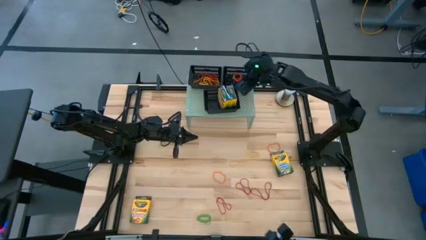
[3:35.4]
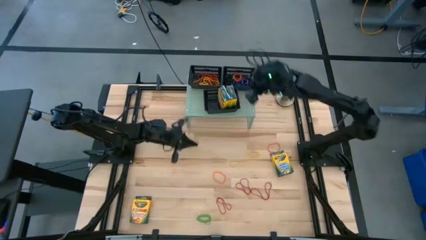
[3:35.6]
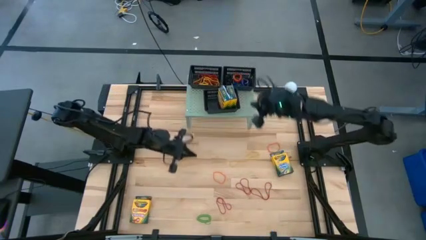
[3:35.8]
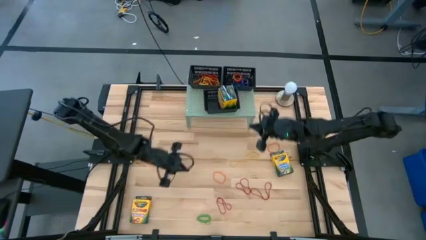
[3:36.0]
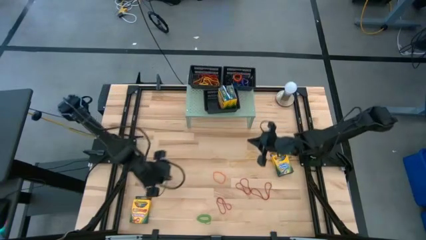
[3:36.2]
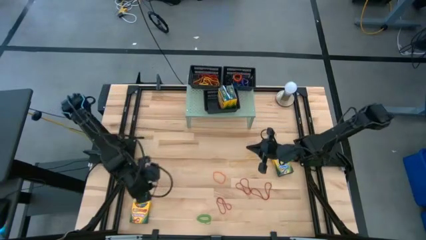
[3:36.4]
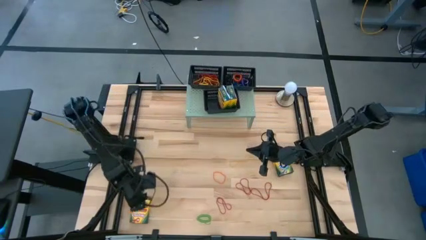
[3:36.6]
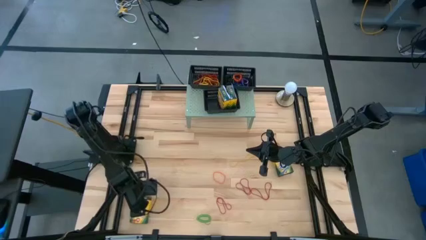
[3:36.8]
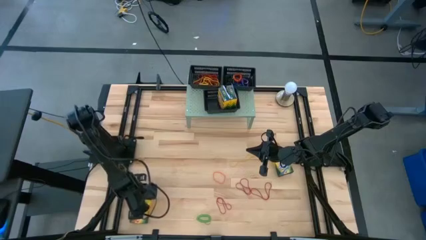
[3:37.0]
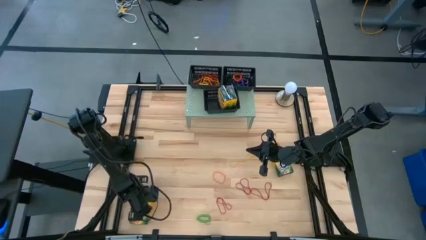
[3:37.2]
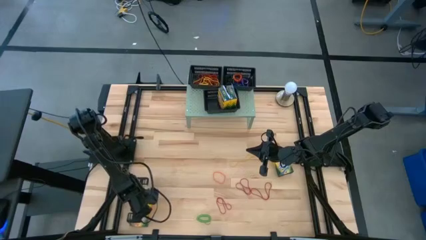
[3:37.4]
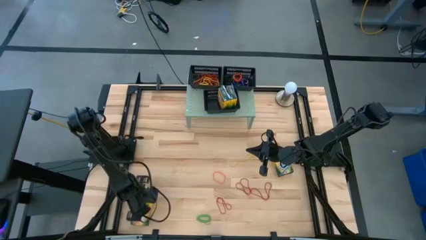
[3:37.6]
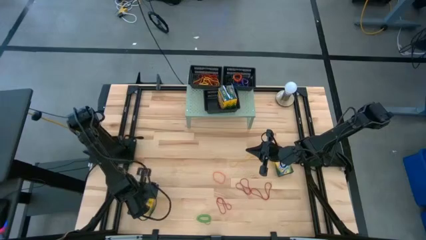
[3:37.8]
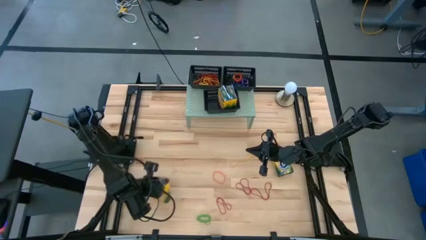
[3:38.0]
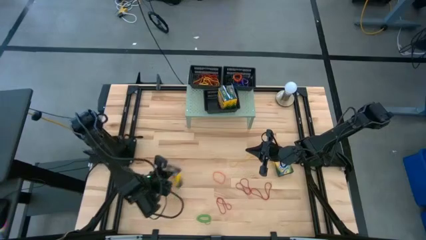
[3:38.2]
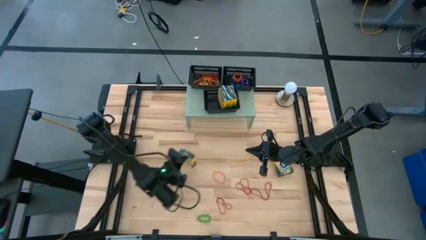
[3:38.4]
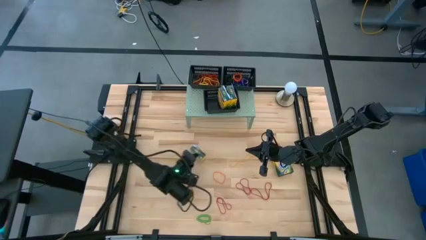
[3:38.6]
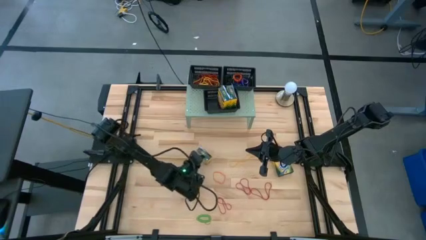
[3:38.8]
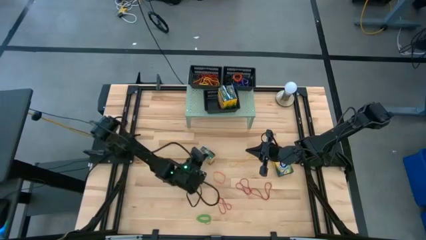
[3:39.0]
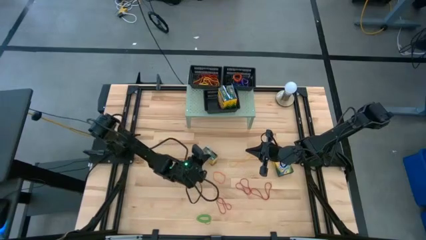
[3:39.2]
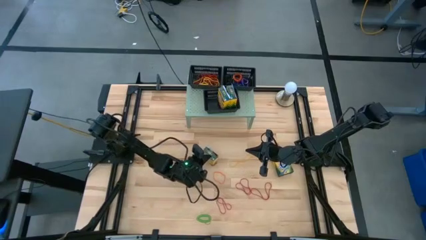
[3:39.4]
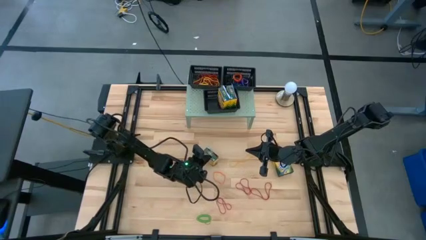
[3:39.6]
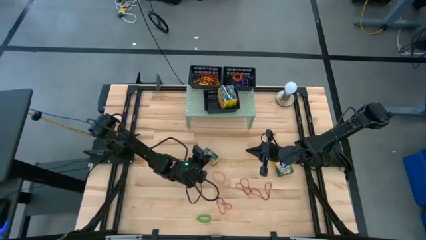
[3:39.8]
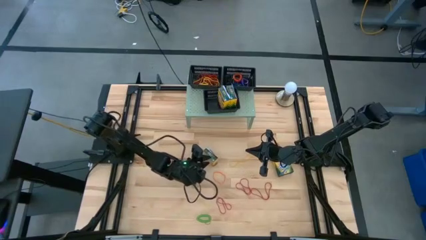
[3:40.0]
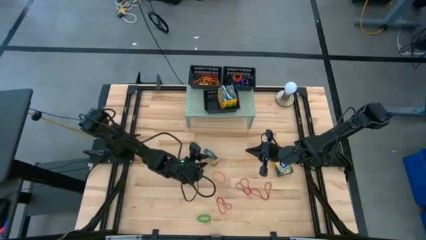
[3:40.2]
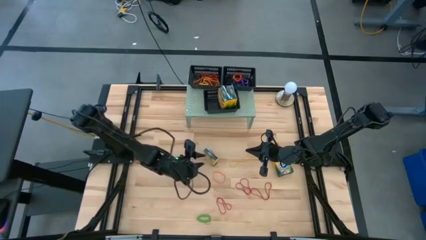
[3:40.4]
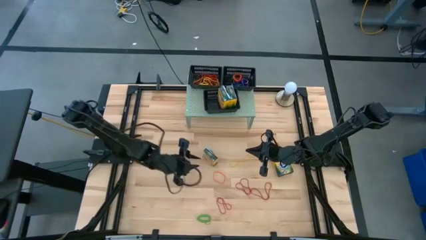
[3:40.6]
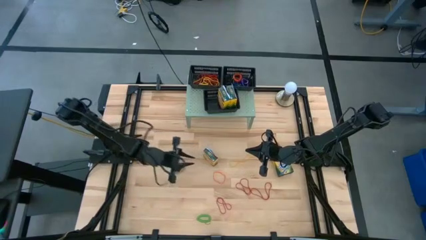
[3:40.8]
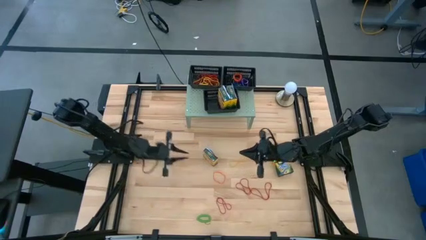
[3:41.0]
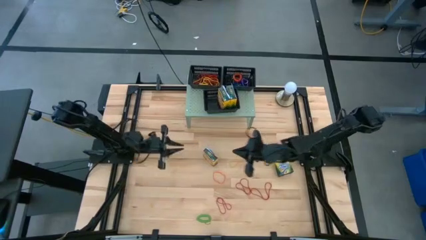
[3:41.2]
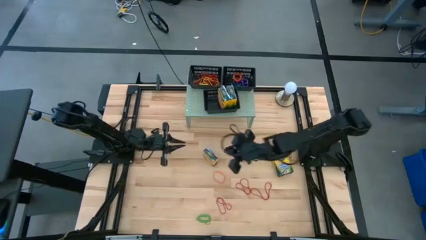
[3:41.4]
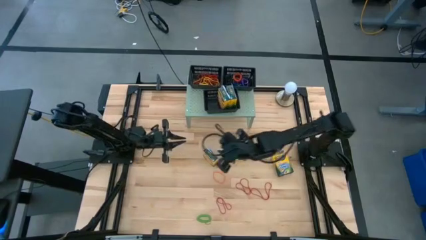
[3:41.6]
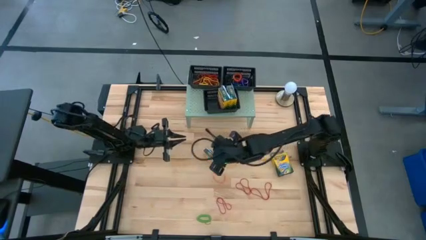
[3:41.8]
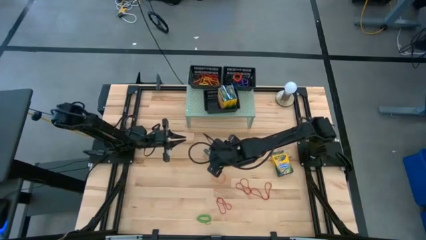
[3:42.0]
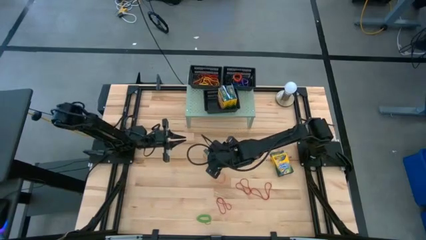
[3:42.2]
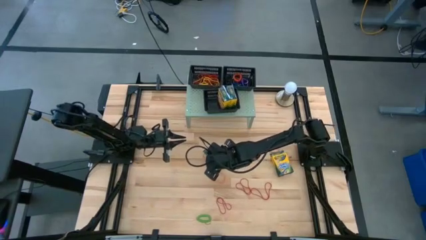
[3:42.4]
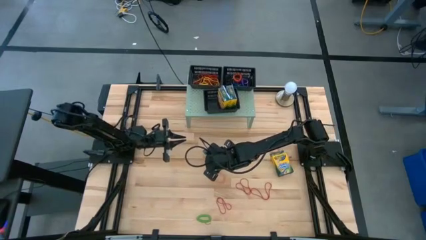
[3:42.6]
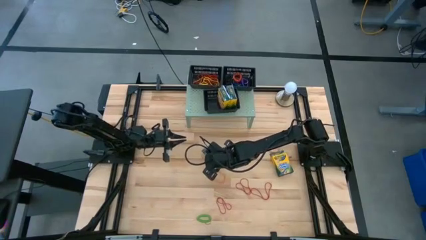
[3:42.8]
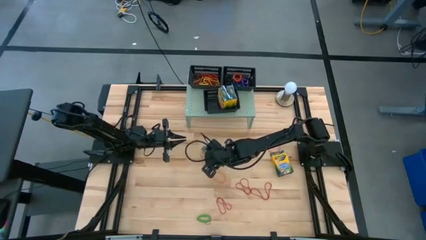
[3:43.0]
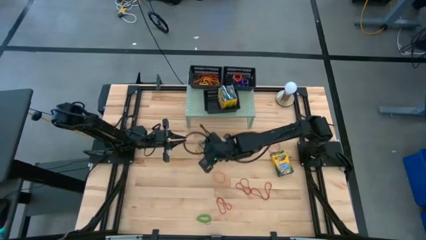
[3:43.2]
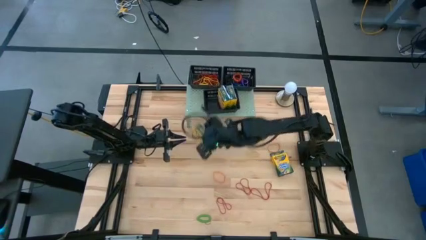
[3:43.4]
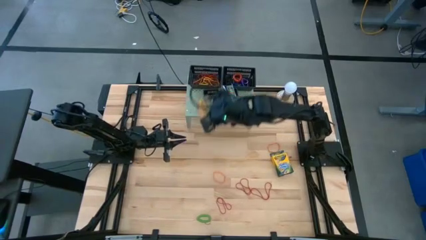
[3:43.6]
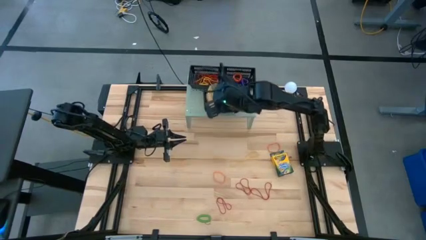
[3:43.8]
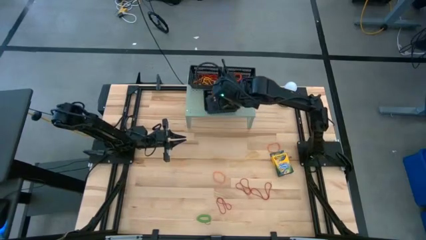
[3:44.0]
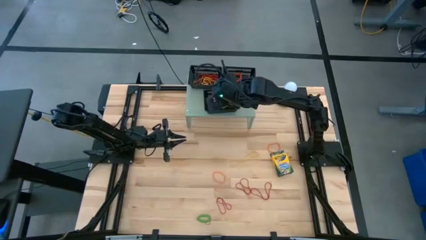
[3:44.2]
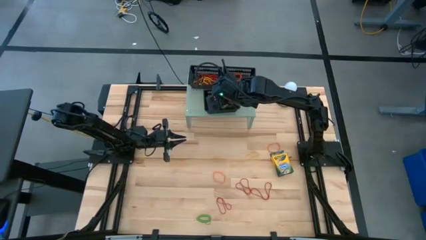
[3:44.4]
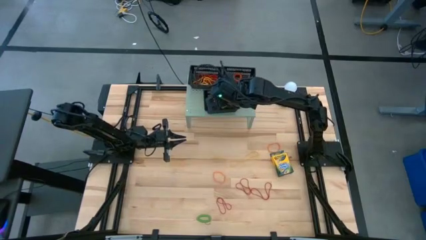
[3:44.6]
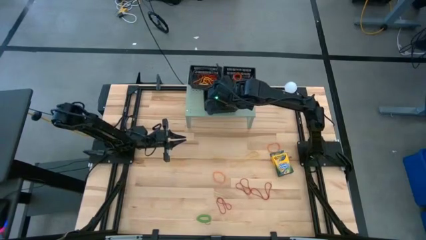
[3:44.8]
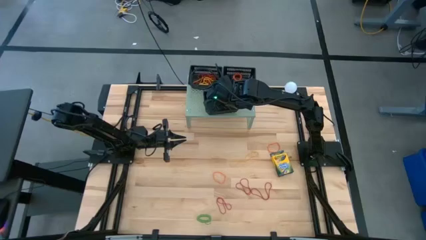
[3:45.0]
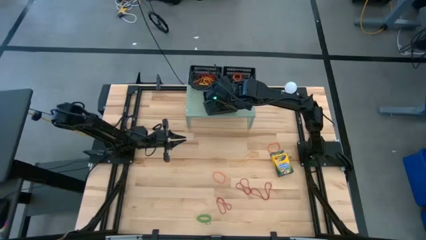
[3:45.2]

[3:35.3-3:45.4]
Task: Pick & Place Office Desk Supplies
Put the yellow crayon box into the bottom black bin

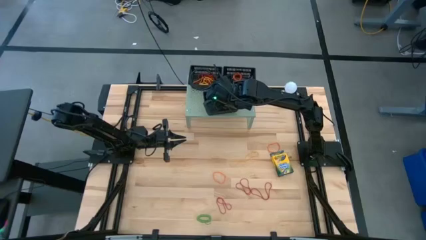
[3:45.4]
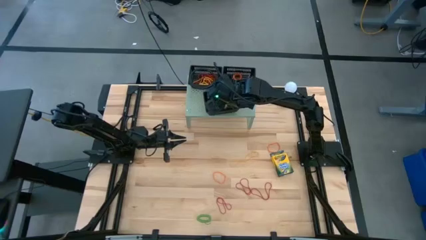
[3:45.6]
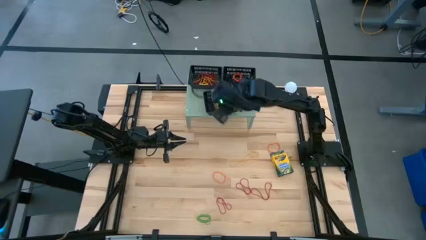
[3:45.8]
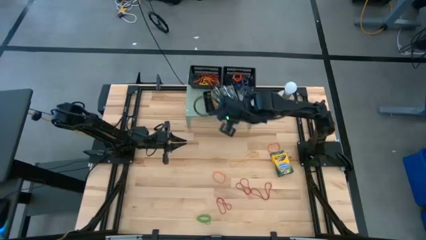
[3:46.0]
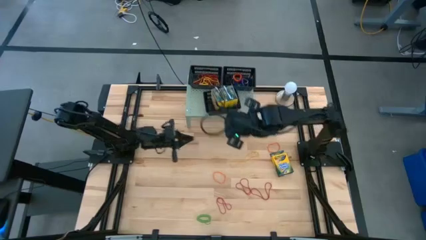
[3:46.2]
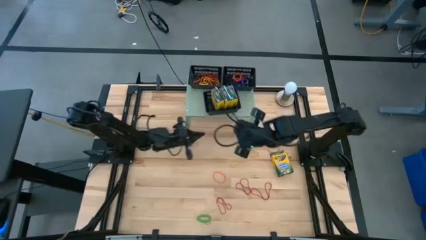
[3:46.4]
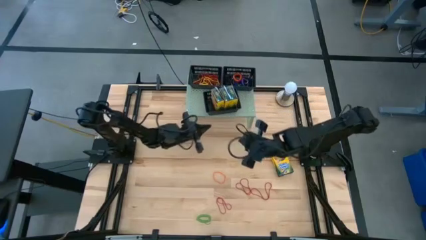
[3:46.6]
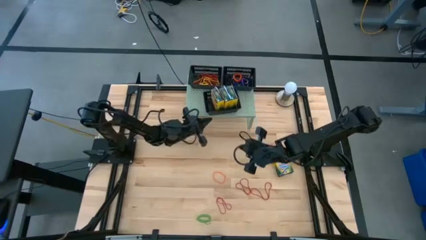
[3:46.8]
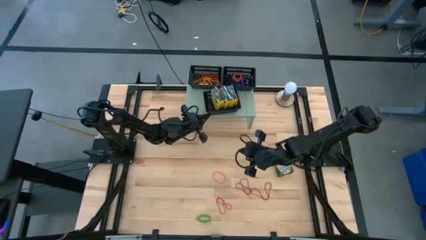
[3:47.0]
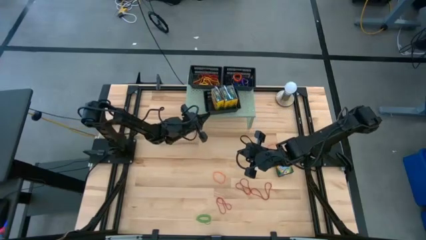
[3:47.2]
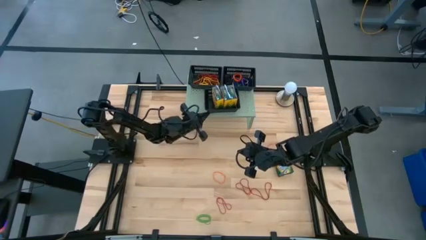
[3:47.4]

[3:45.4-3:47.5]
Adjust the bottom black bin on the shelf

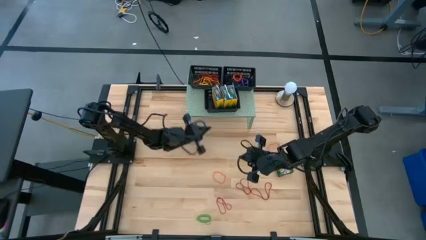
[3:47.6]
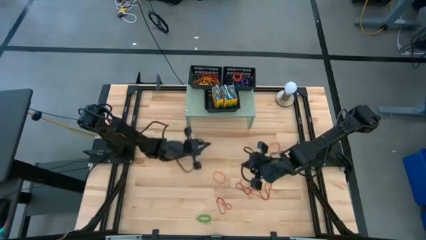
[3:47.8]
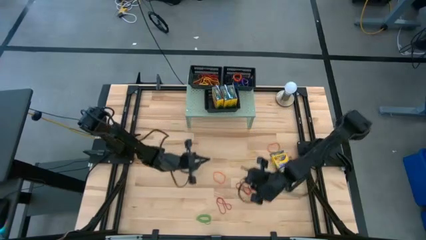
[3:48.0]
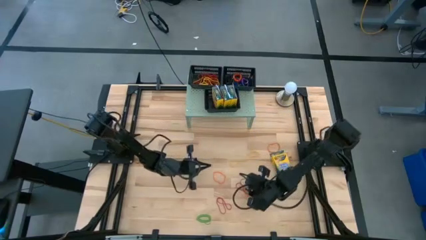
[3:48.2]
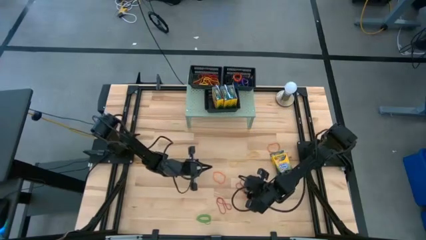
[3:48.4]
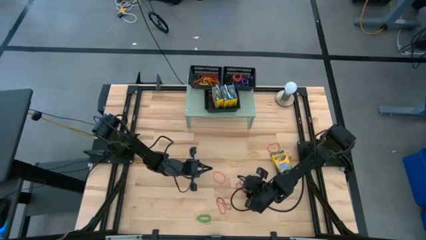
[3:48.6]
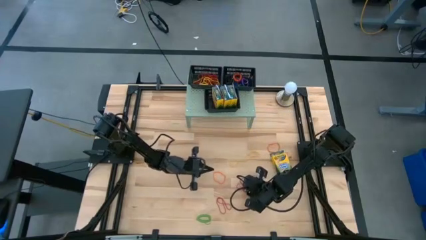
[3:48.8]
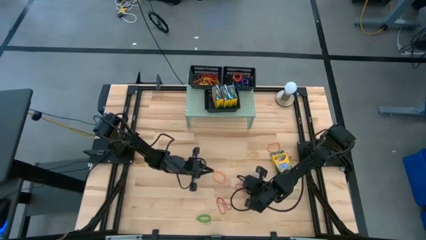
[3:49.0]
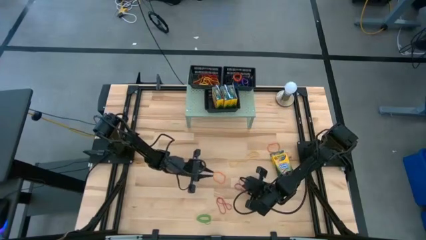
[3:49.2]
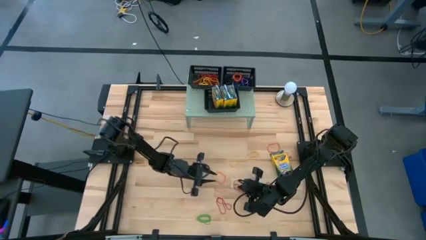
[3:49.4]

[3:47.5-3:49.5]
Put the red rubberband into the top left black bin
